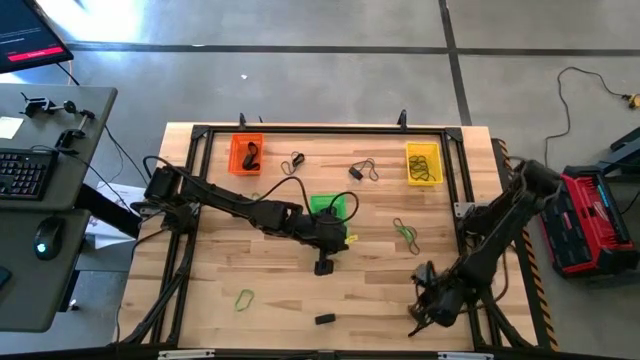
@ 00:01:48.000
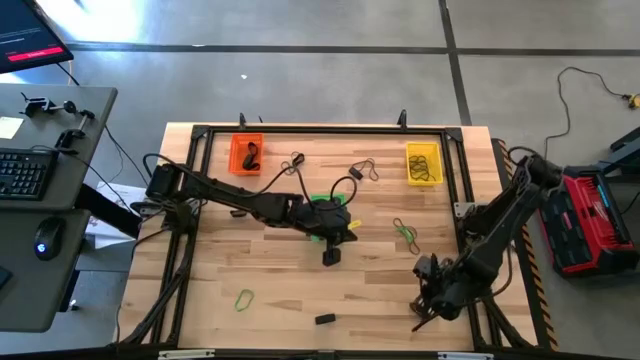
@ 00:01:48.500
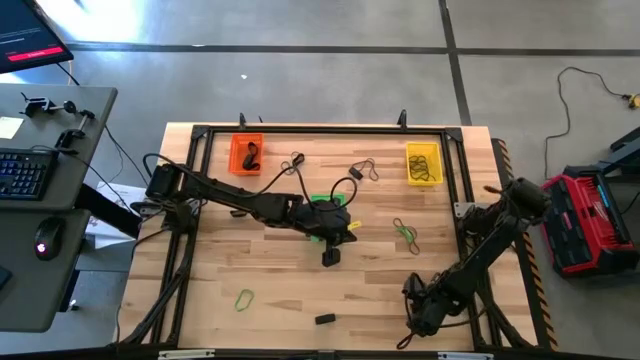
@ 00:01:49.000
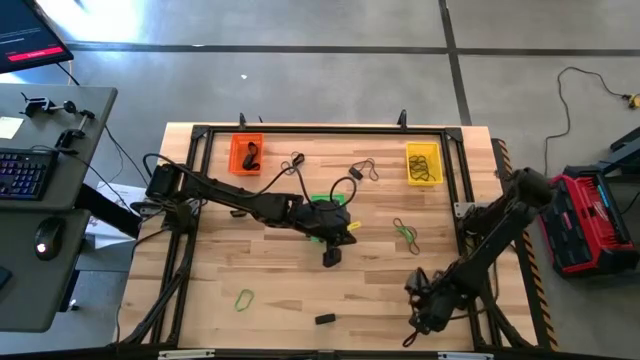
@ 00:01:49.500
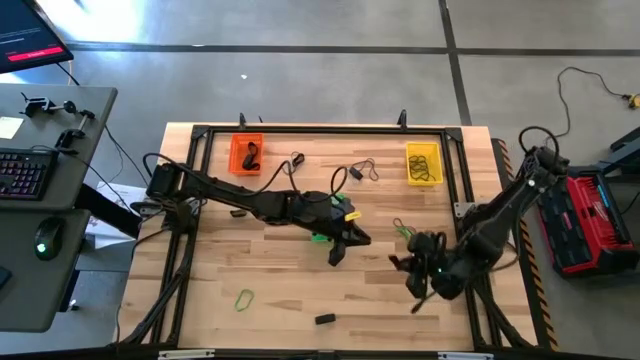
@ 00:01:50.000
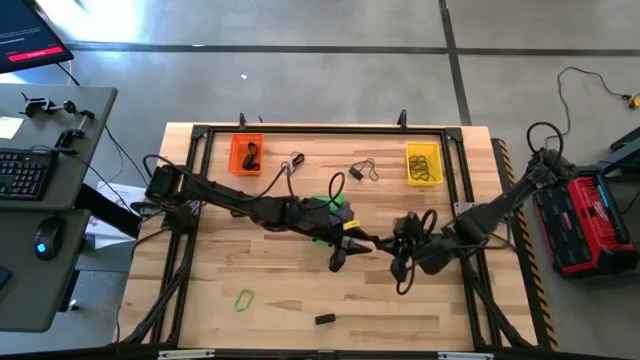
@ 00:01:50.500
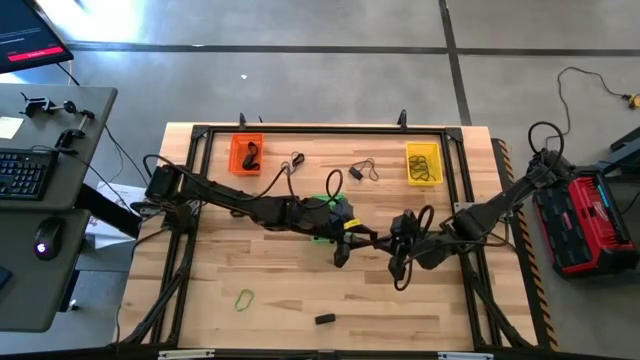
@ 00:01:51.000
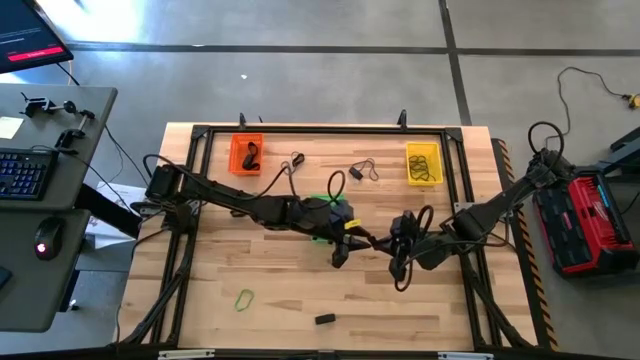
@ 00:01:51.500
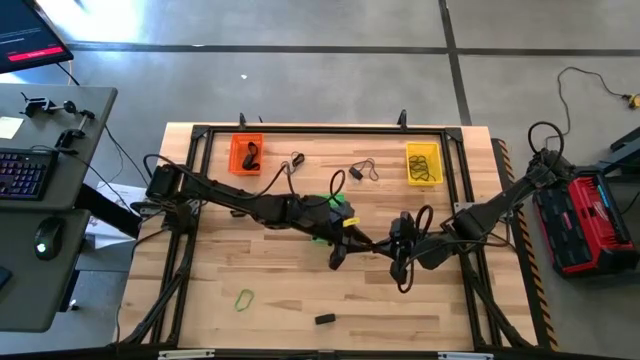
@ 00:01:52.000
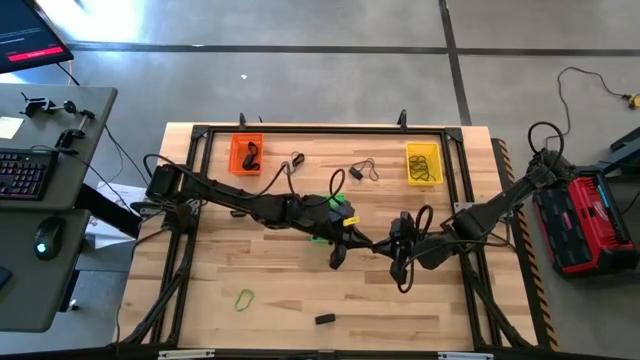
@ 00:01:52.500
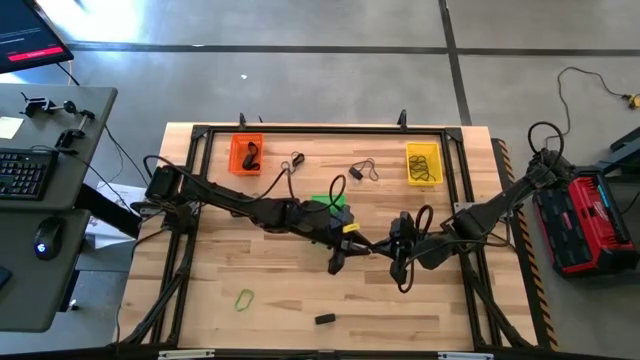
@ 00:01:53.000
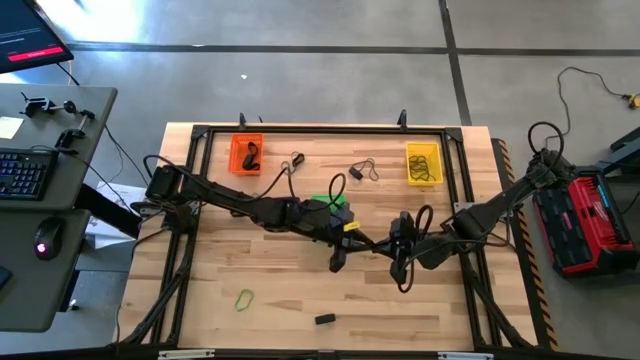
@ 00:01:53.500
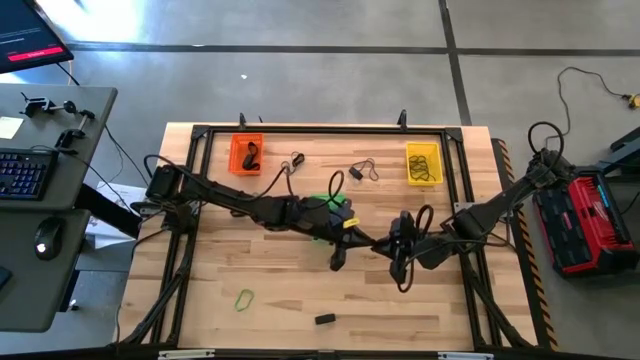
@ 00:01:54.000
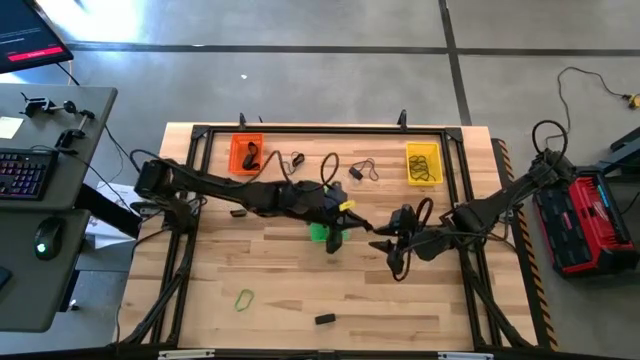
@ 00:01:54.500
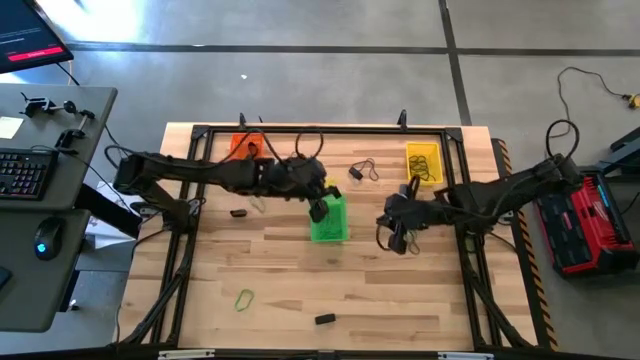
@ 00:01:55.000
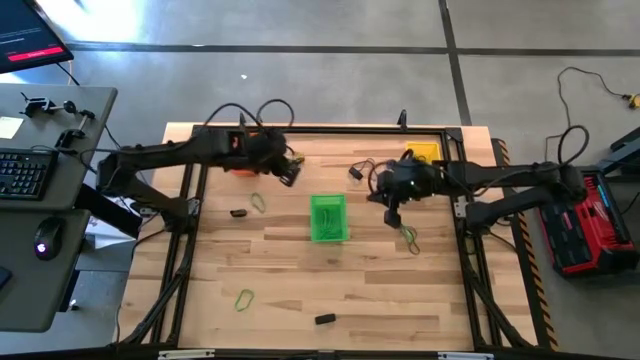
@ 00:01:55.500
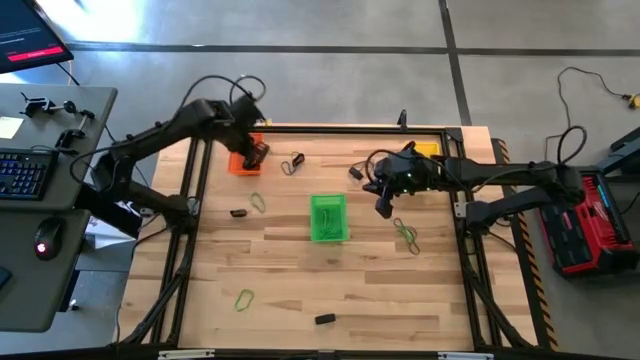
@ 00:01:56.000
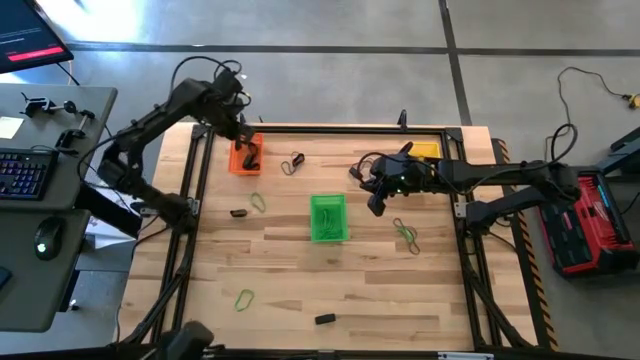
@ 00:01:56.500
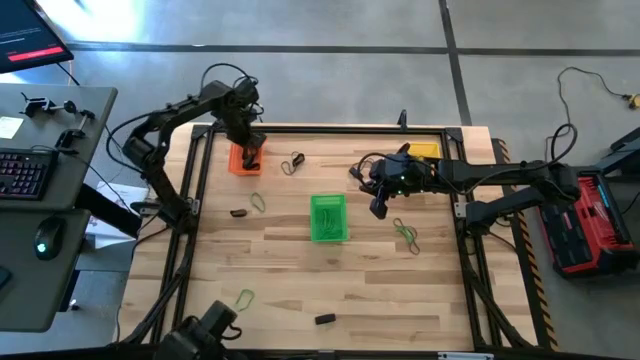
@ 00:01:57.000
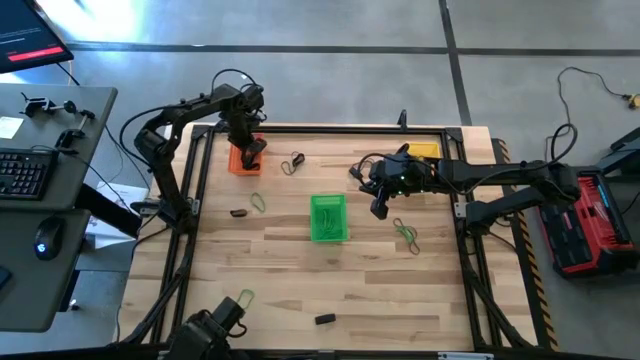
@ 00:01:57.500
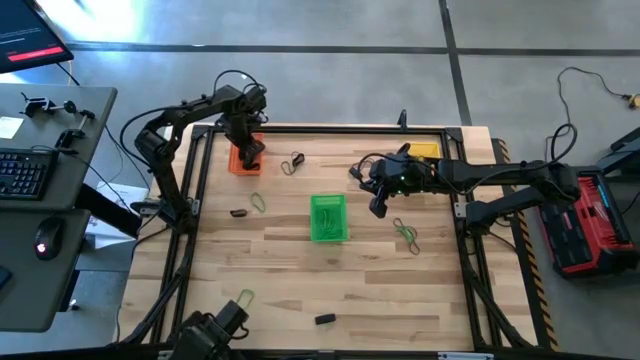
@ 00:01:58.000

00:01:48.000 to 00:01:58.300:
Task: Sort rubber bands into baskets
Put the black rubber band into the orange bin

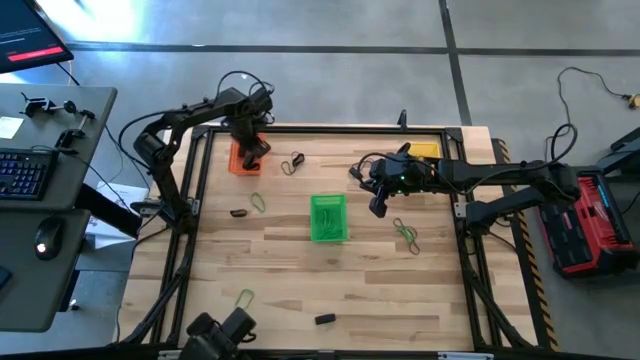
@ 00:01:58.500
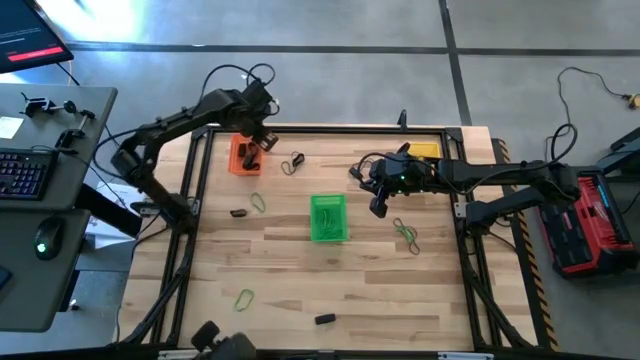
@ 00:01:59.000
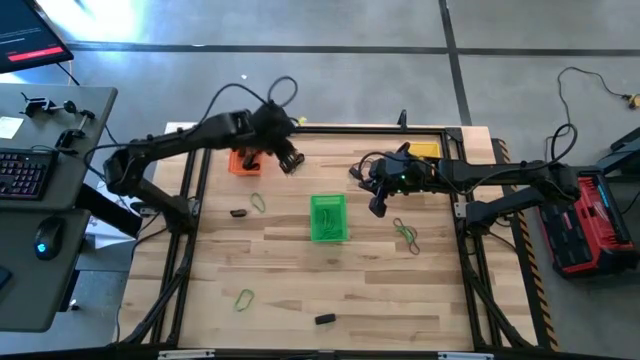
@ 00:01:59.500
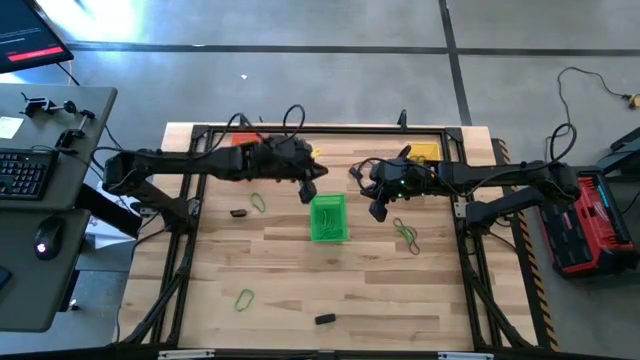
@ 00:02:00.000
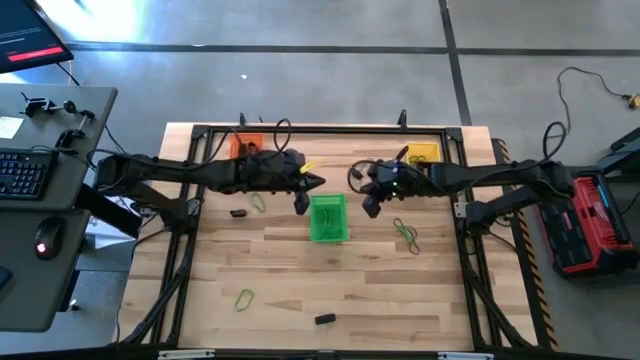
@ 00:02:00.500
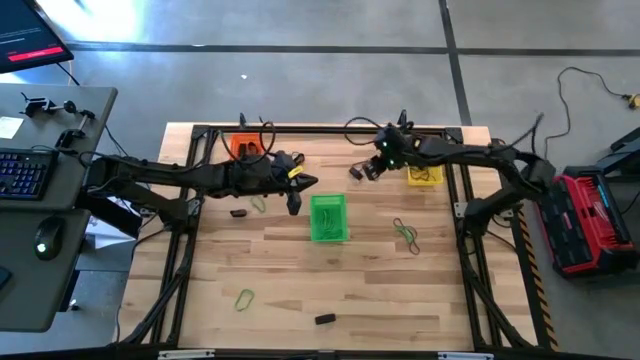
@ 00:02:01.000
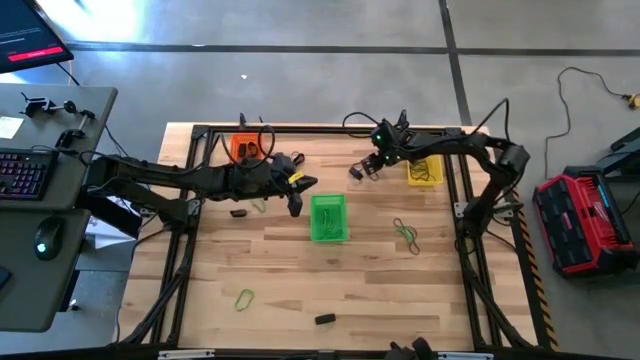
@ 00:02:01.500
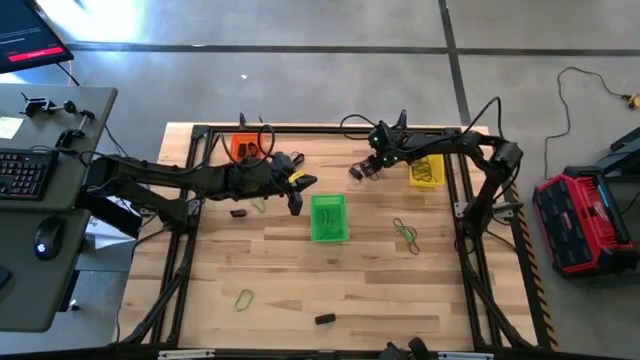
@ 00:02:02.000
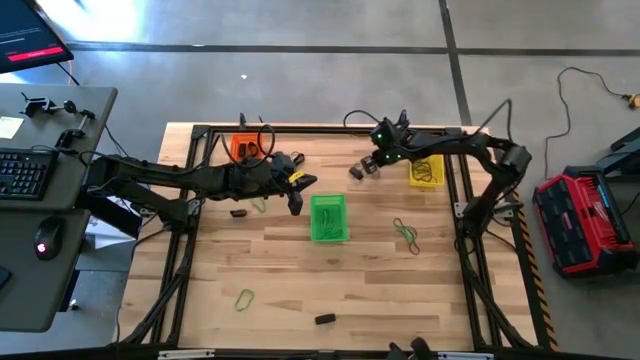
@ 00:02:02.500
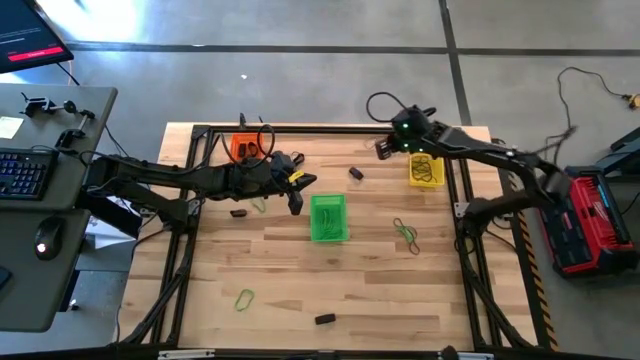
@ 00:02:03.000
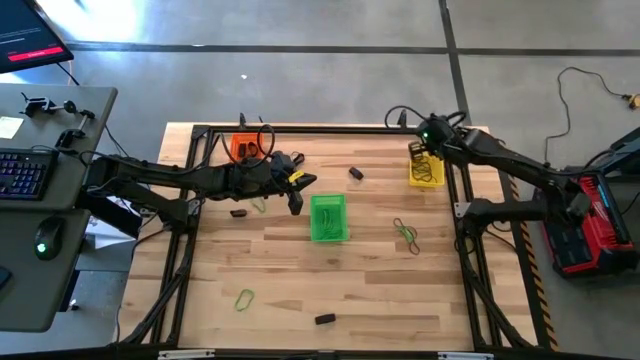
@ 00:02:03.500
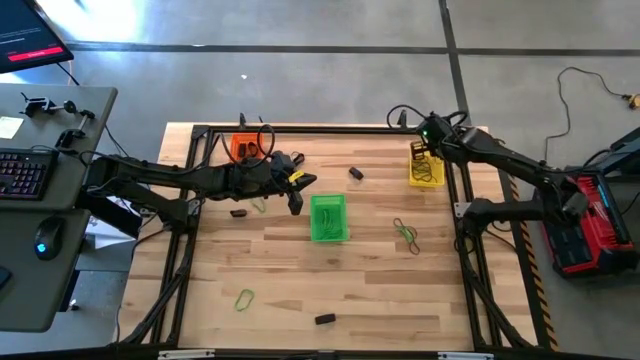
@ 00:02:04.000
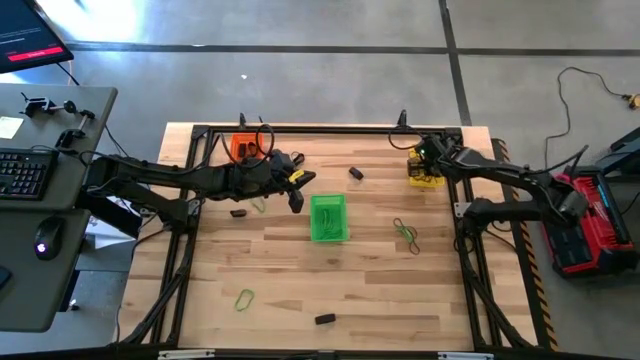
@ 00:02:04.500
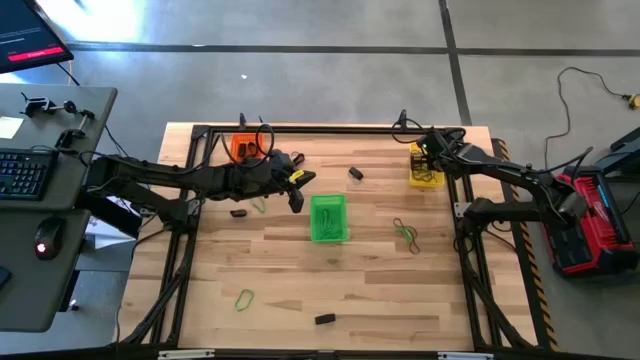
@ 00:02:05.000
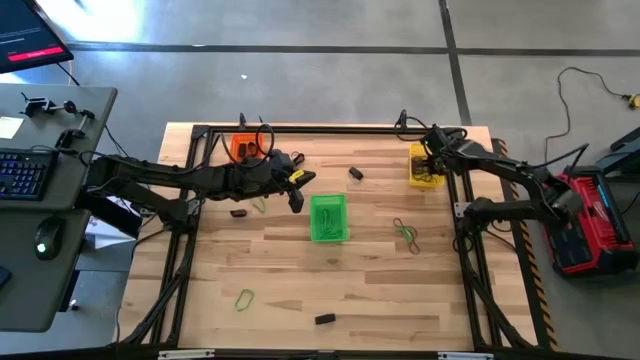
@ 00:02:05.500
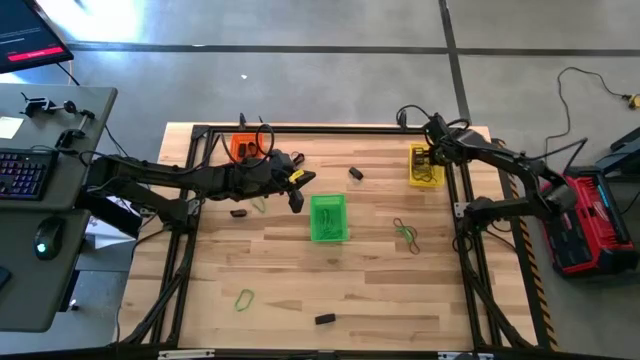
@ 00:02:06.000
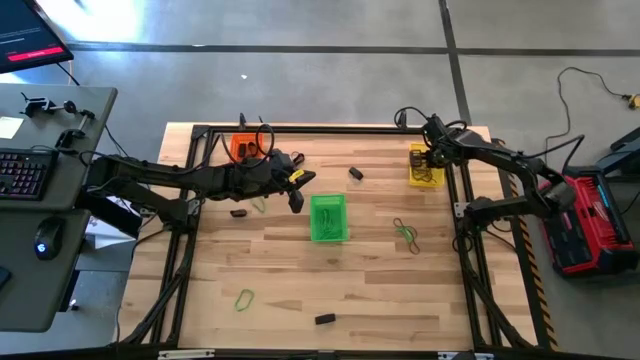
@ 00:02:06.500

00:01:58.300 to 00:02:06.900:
Put the purple rubber band into the yellow bin

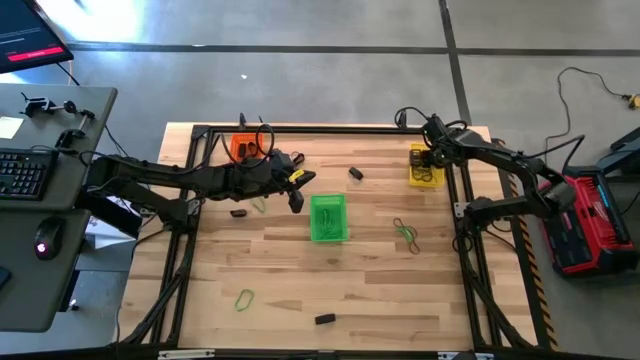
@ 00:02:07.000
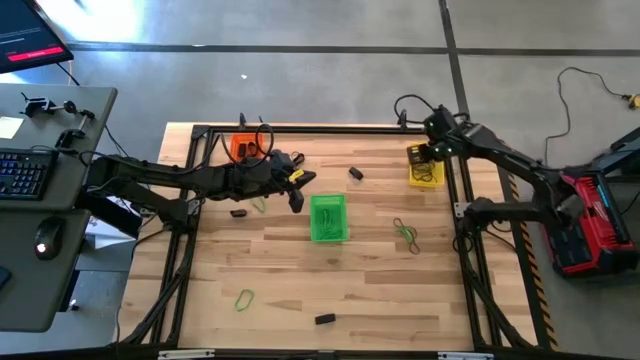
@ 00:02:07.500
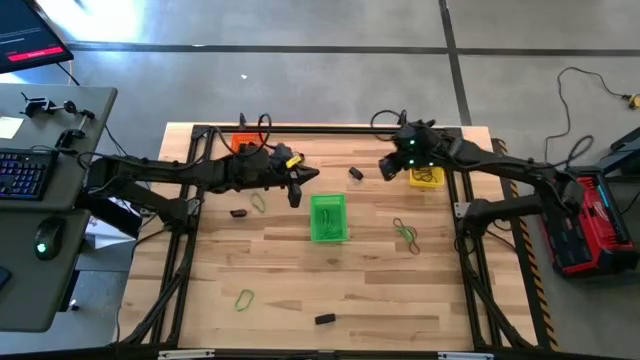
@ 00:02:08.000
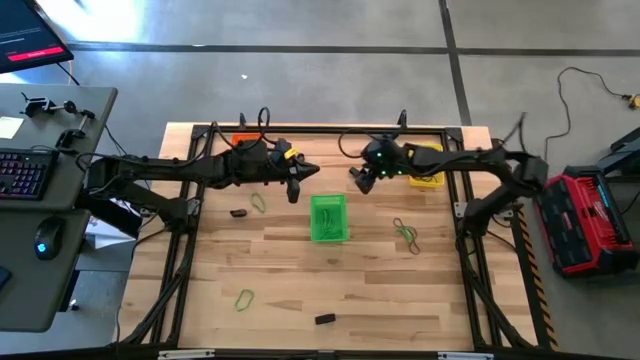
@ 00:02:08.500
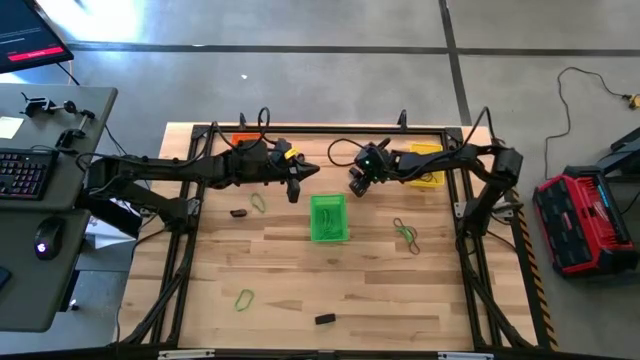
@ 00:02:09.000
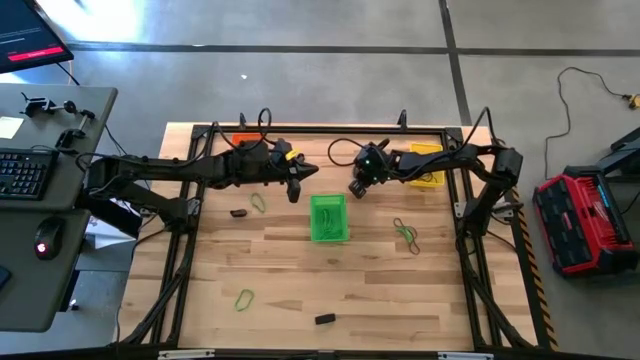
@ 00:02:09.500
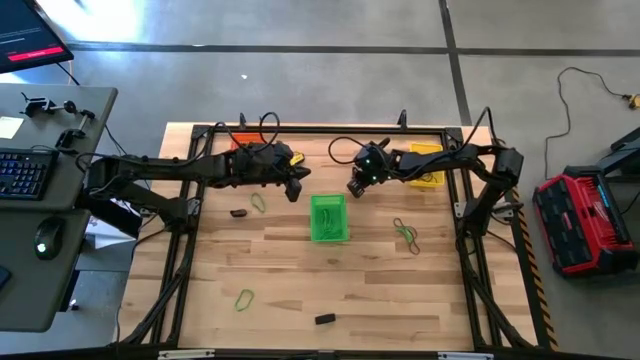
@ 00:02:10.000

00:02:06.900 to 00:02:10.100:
Put the black rubber band into the orange bin
